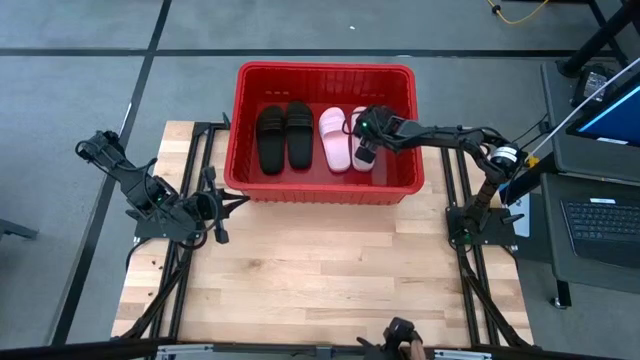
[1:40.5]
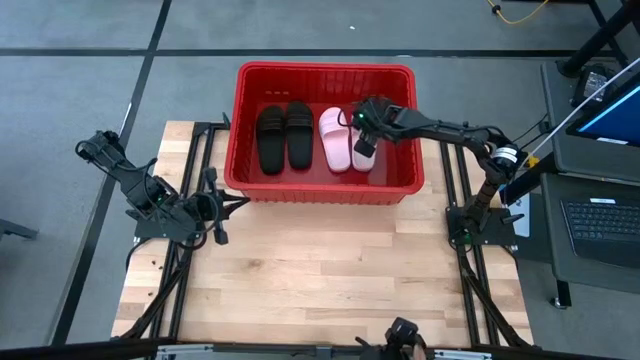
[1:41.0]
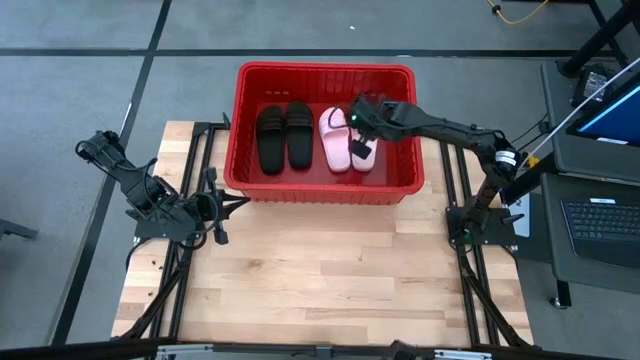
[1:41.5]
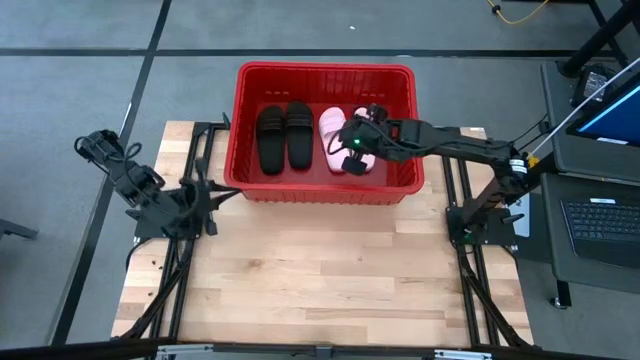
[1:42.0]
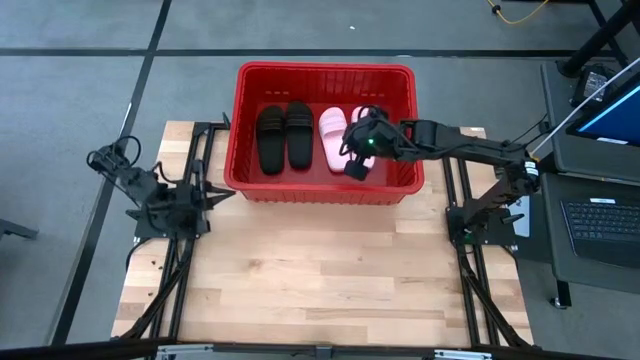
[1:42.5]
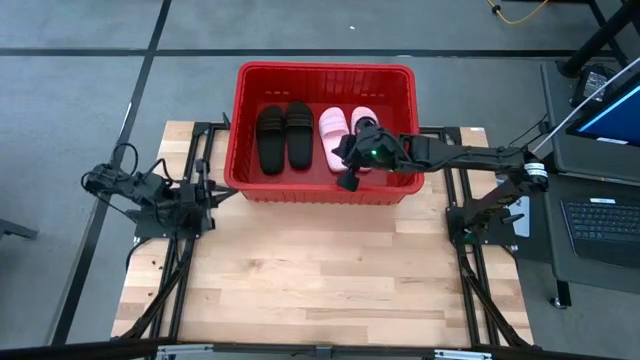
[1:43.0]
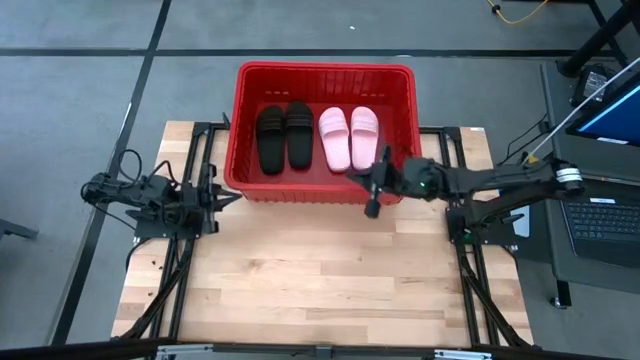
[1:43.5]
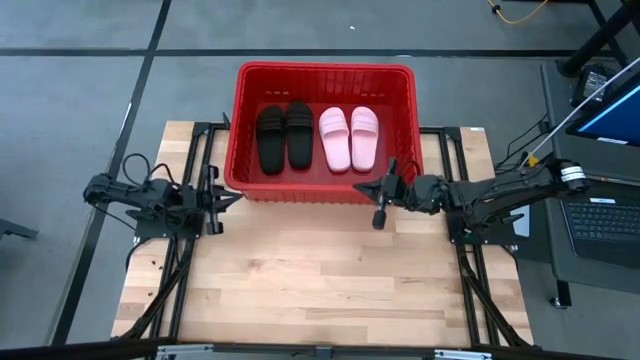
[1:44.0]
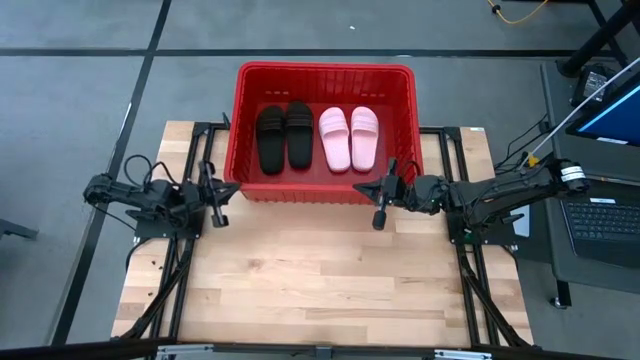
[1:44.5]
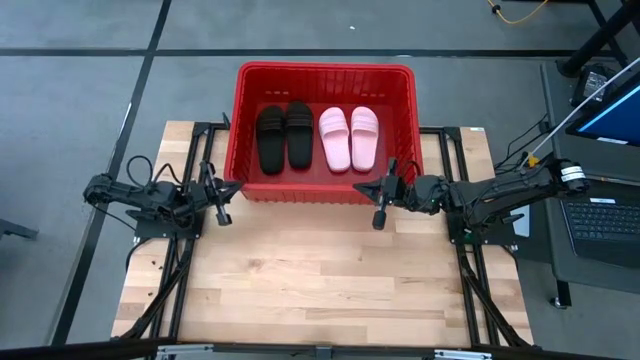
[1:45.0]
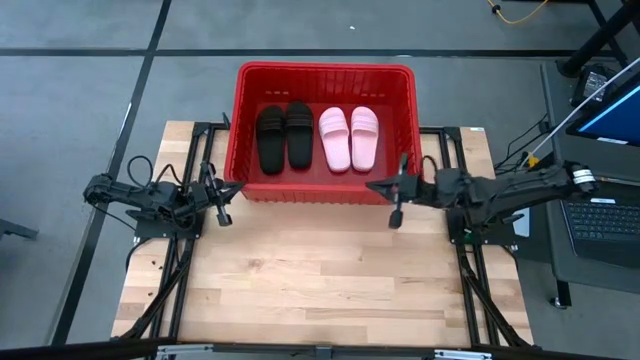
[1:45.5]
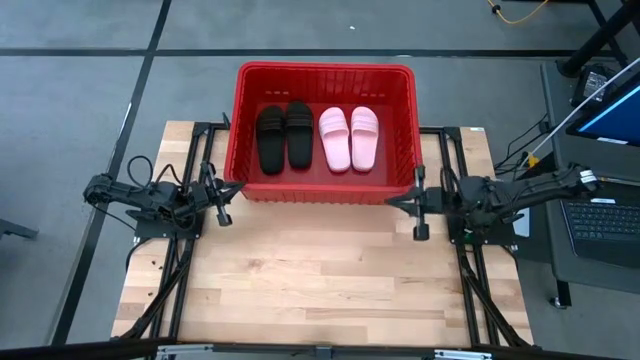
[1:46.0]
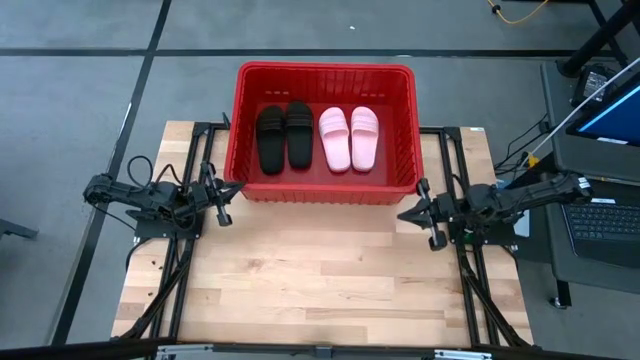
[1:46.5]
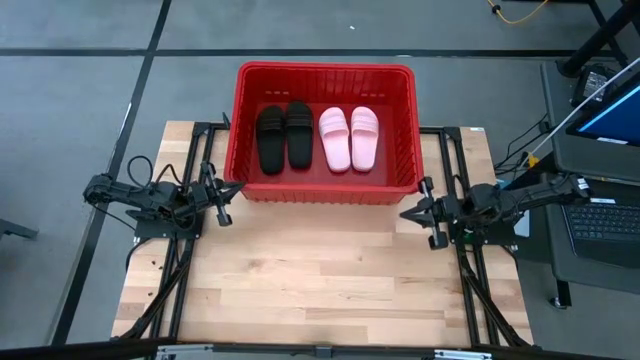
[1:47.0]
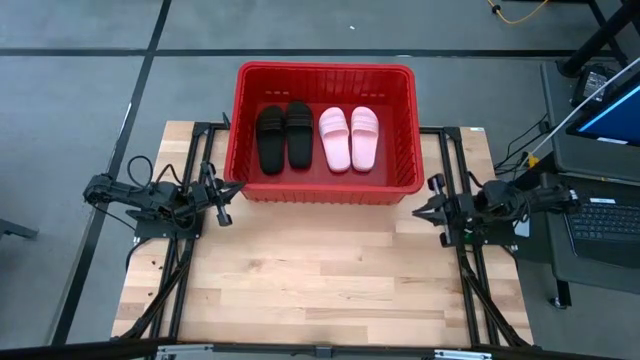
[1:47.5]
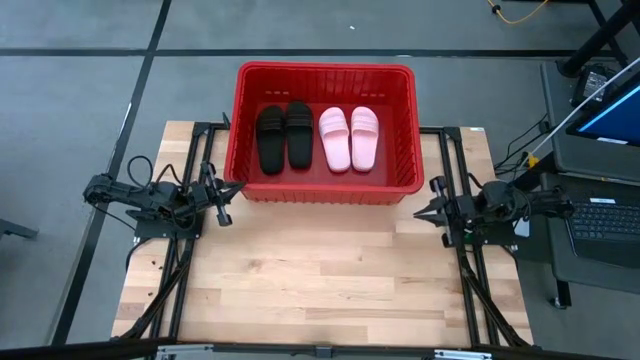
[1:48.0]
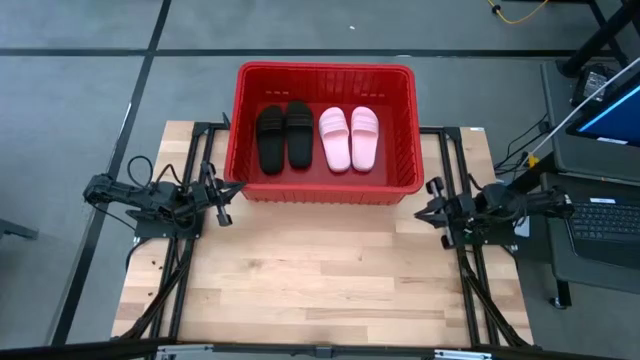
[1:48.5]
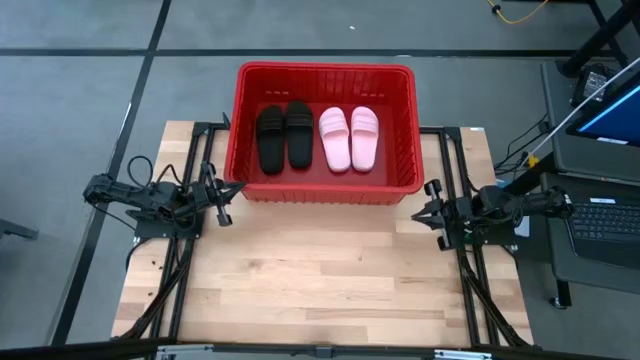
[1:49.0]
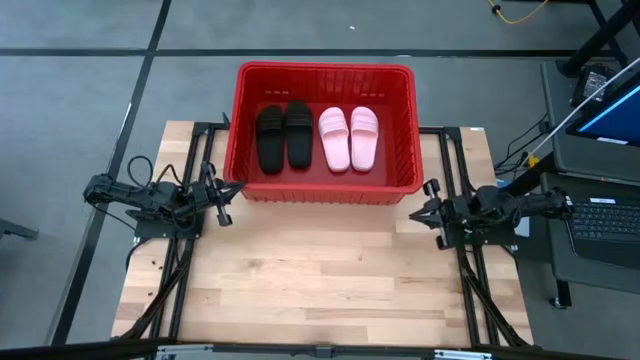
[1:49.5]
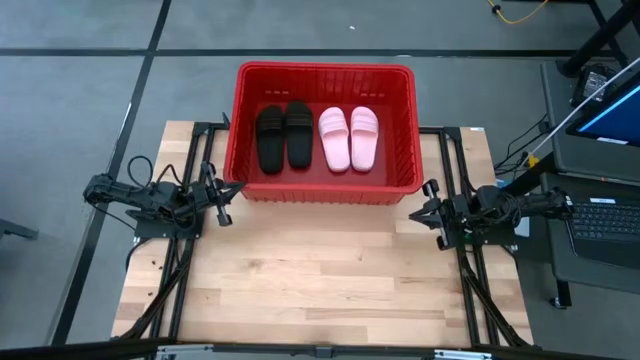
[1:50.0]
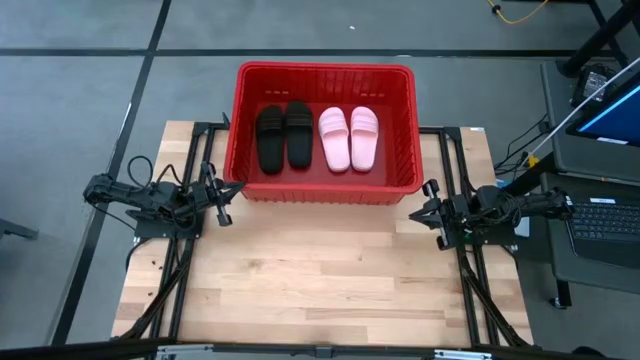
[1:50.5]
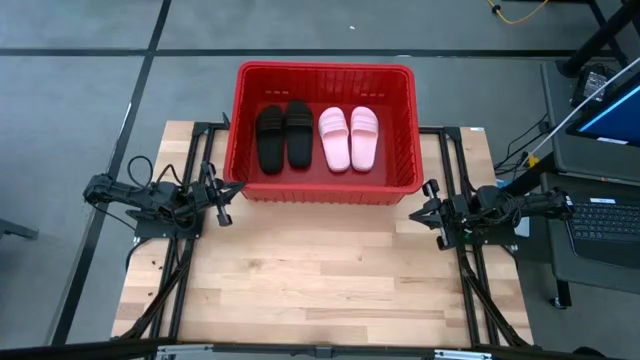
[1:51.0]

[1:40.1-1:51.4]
Task: Pick and place slides into bin
Return to Home Position
